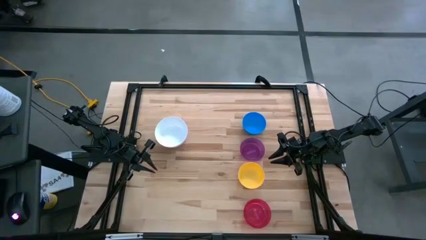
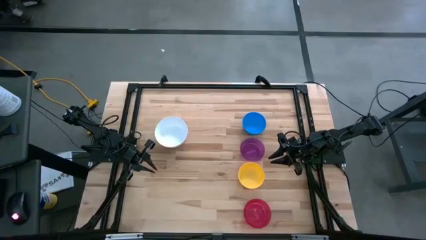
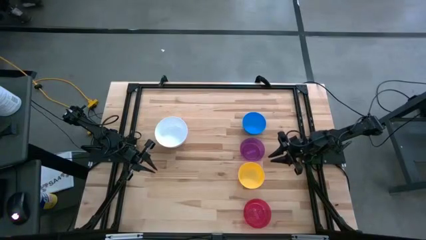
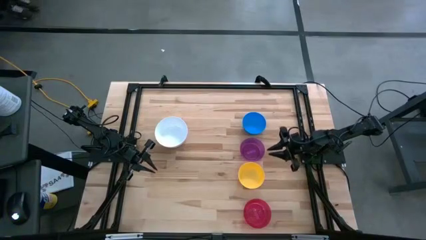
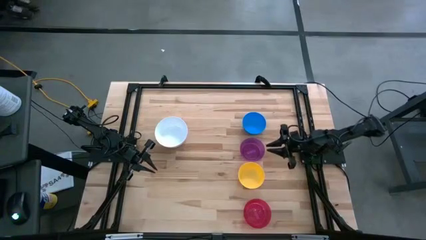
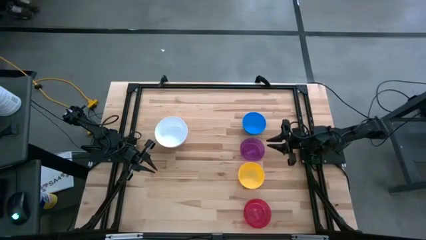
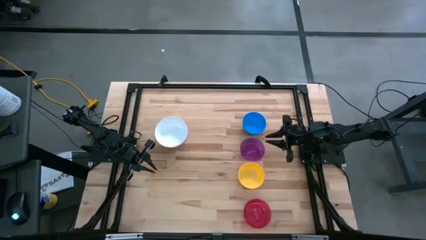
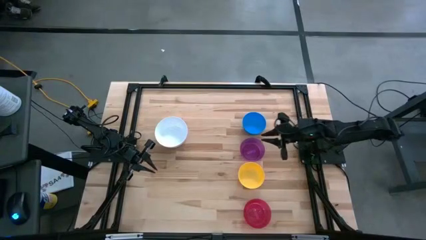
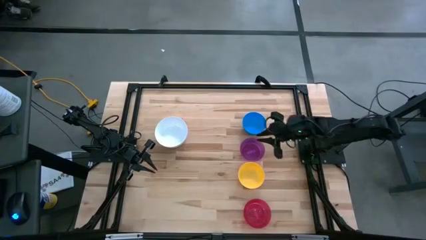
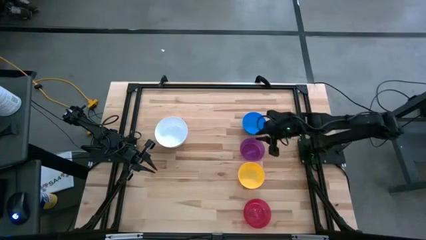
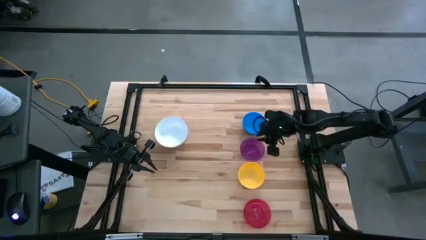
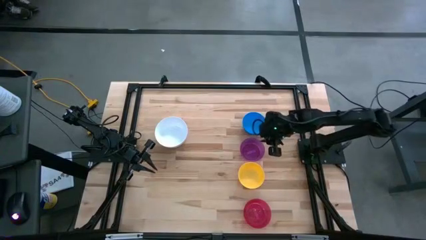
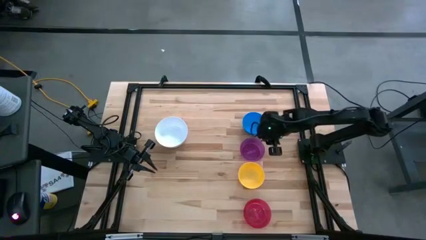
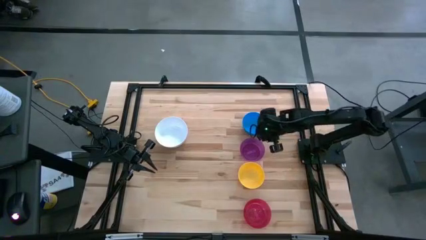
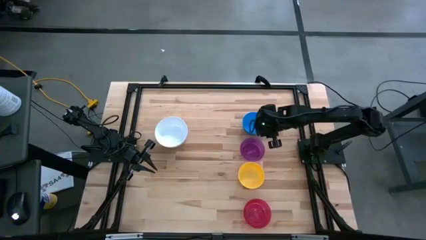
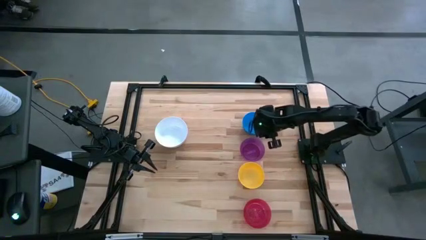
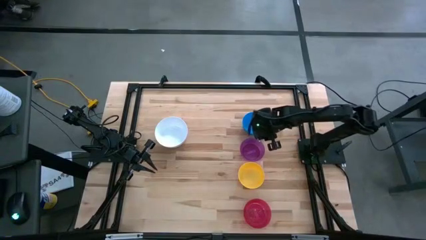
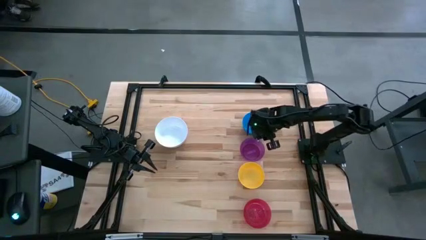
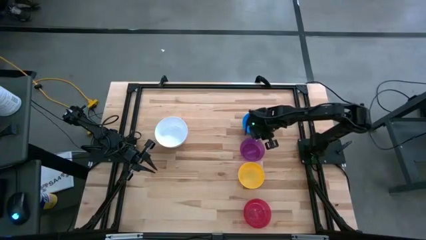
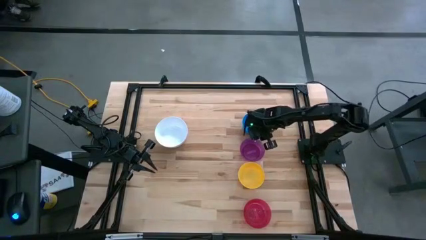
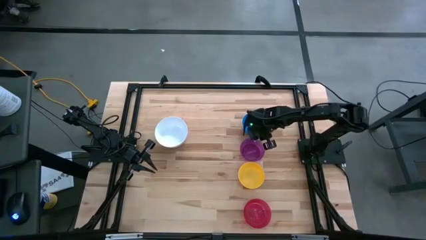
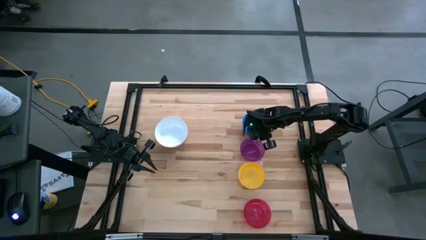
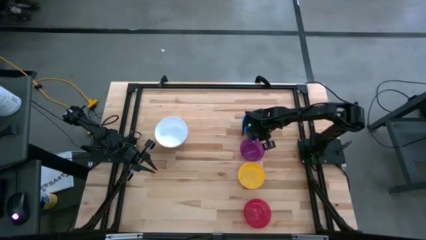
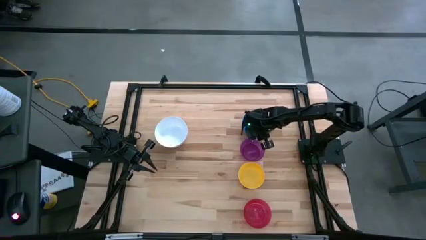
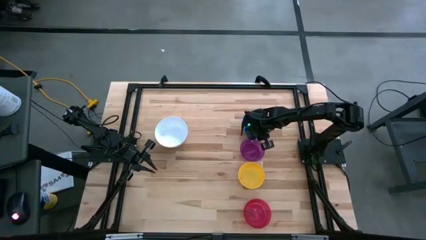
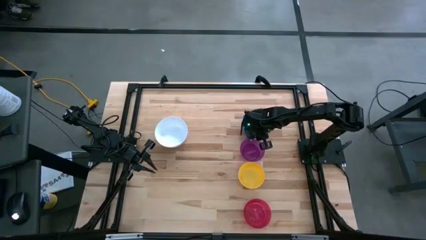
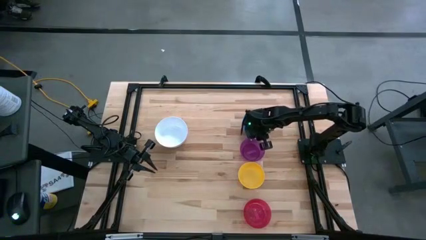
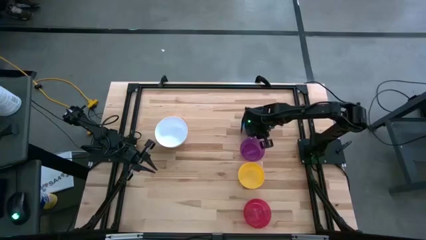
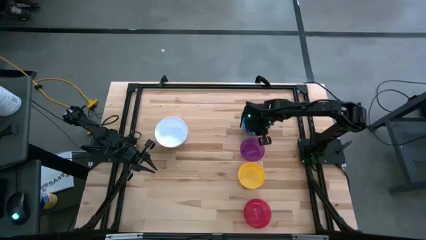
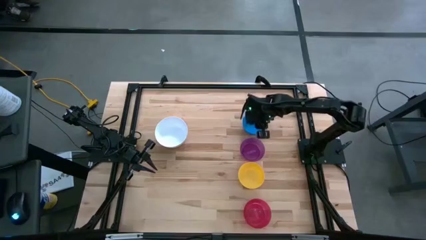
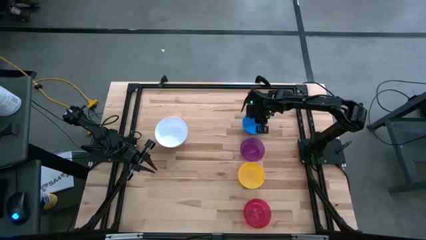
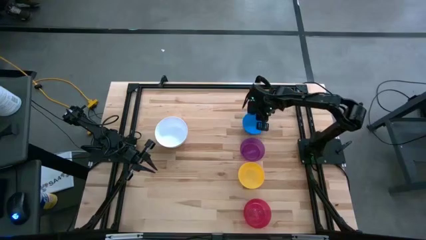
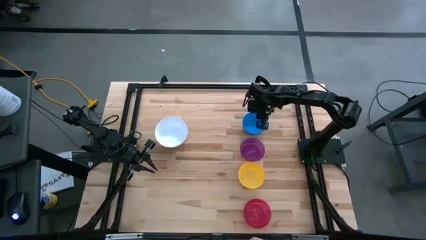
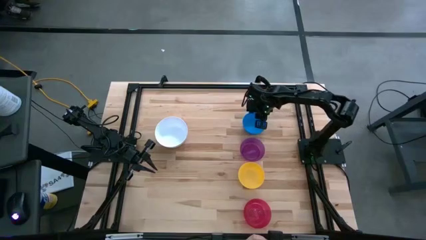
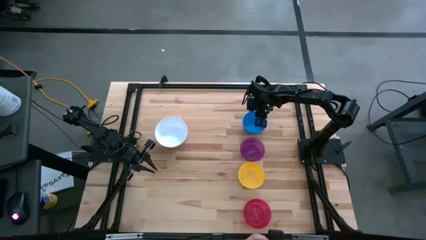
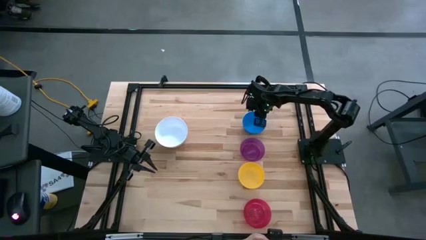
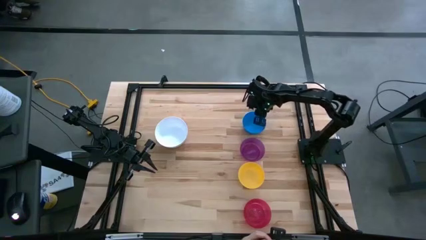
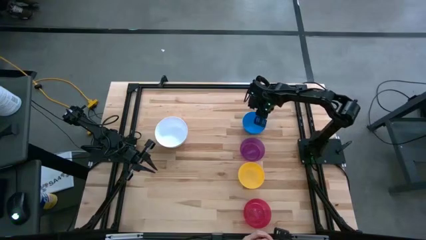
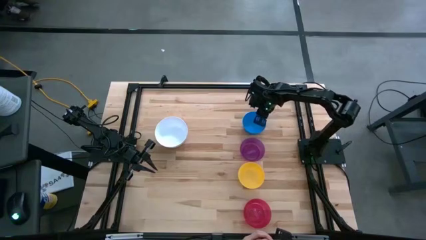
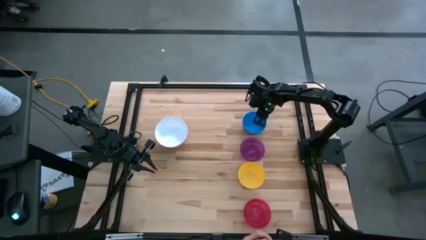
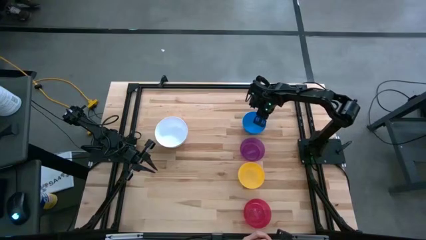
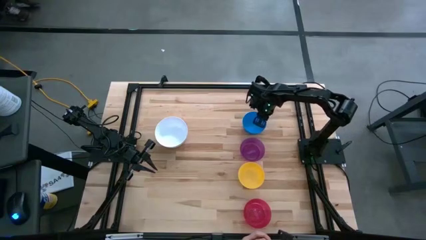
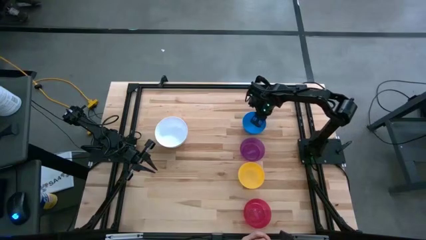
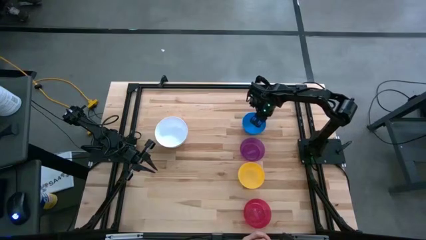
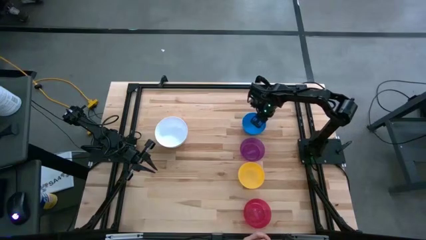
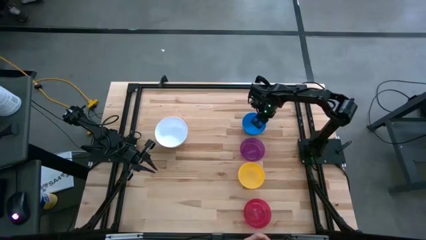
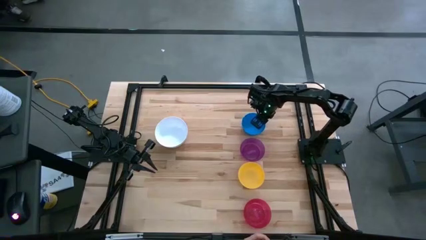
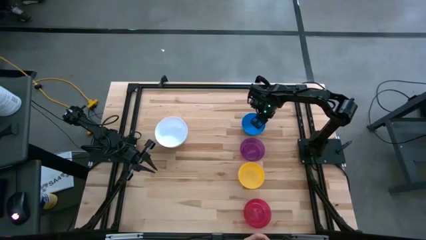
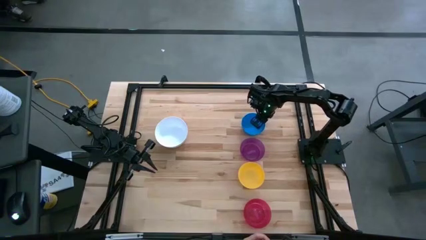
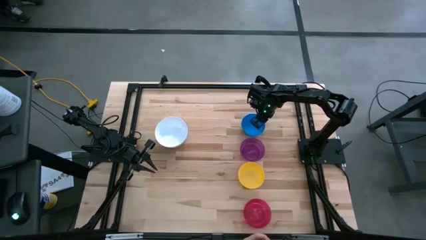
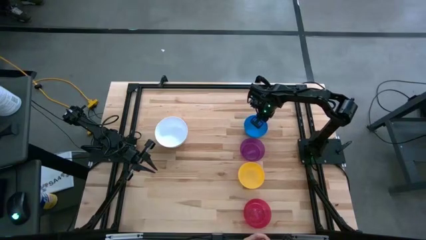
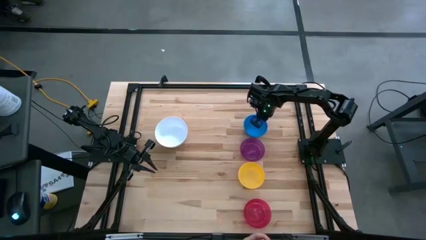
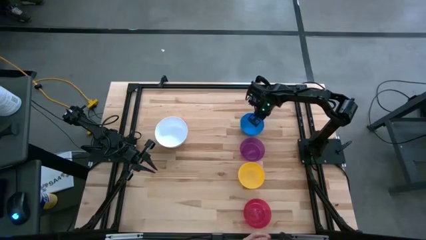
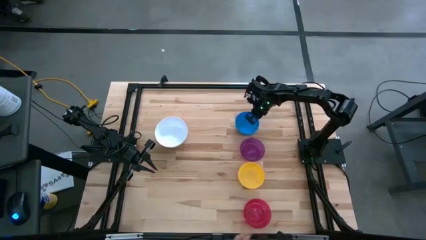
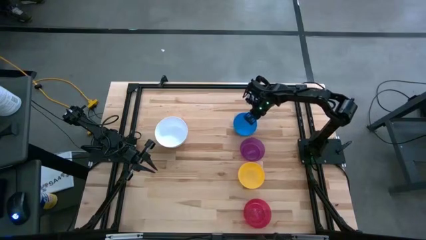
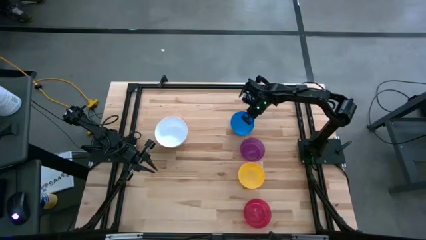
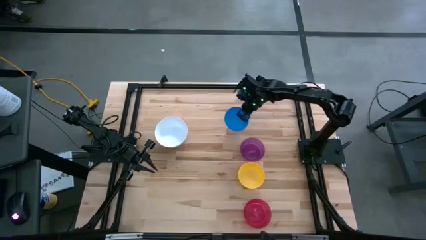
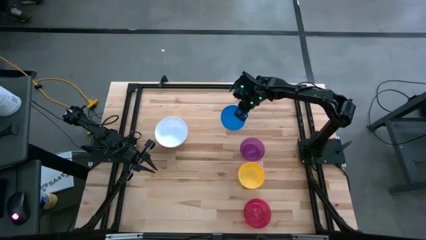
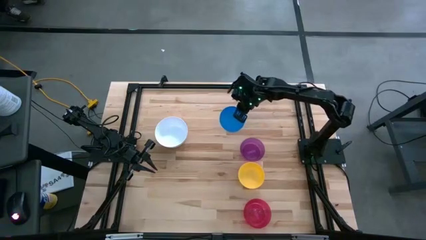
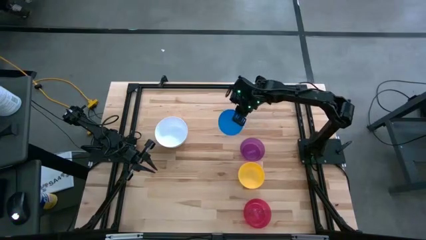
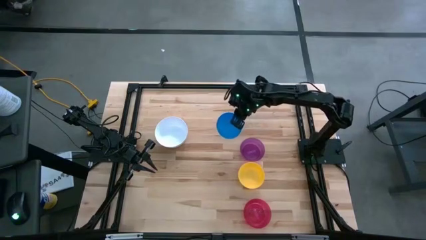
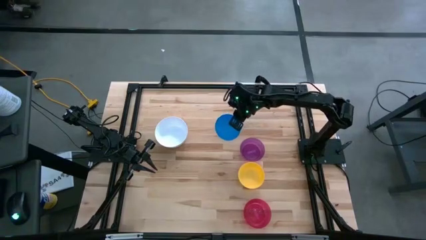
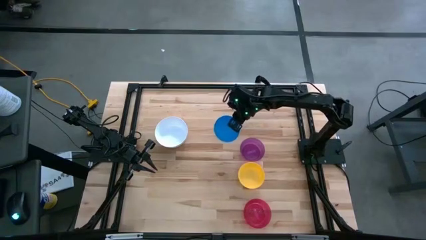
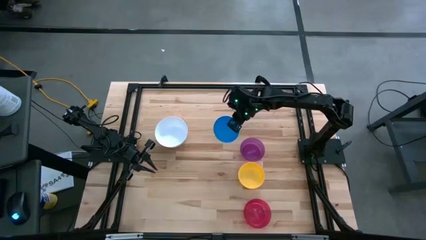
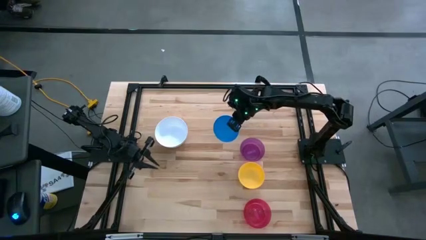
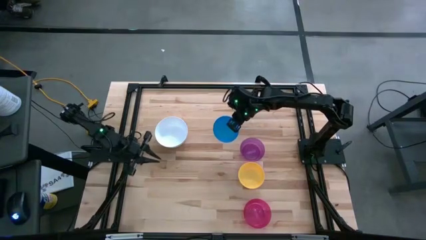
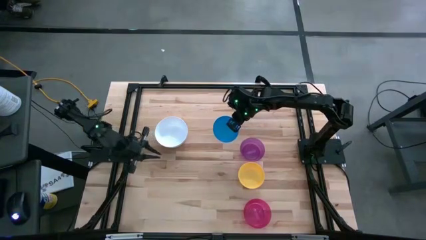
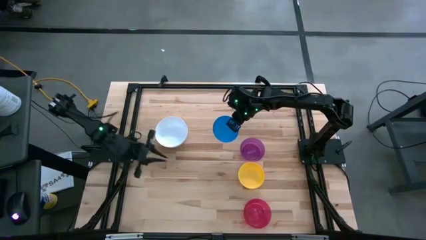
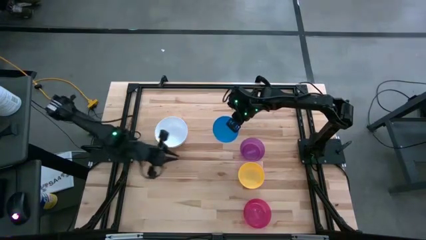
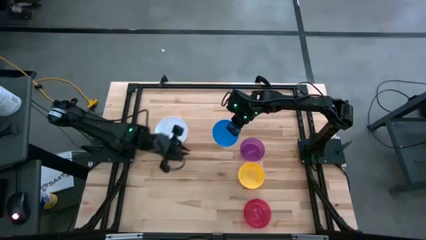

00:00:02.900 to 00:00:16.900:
Stack the blue bowl on the white bowl
